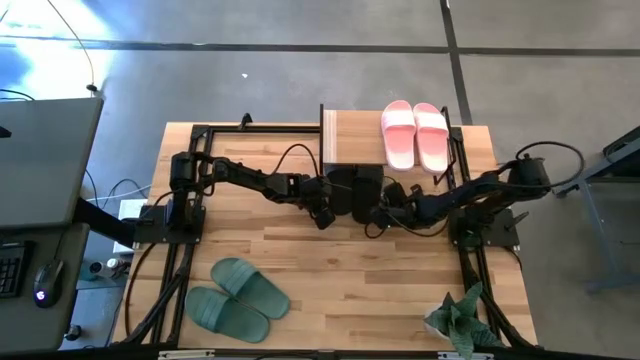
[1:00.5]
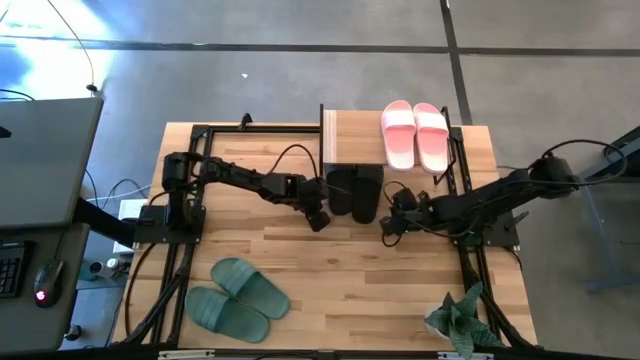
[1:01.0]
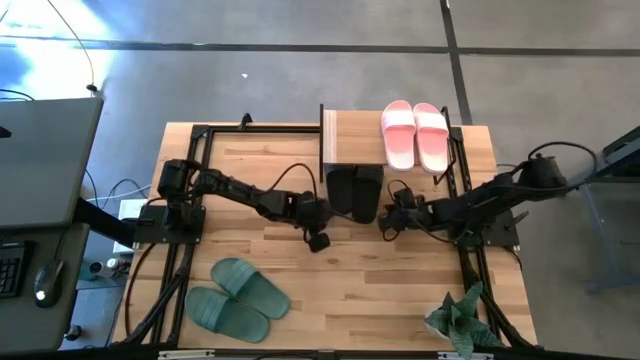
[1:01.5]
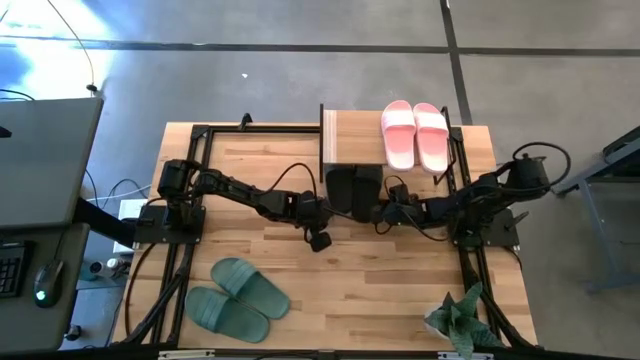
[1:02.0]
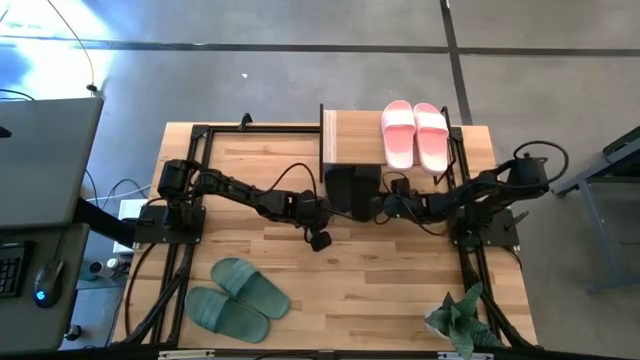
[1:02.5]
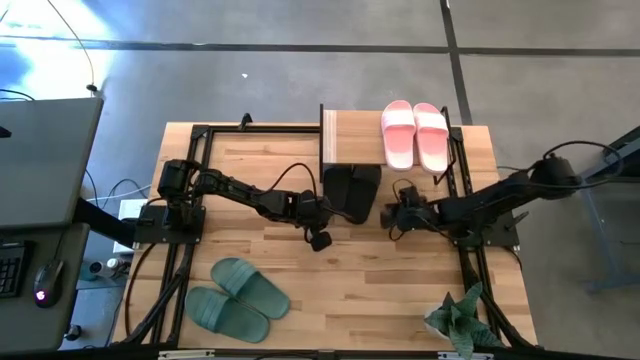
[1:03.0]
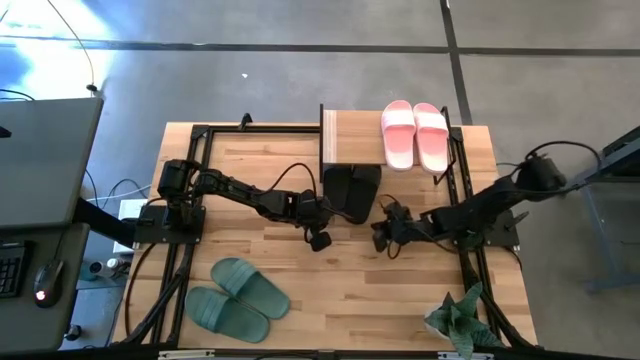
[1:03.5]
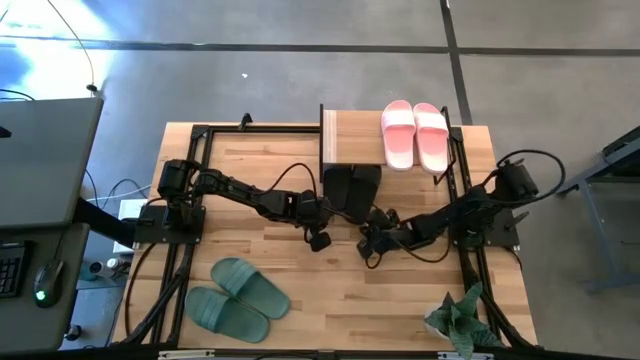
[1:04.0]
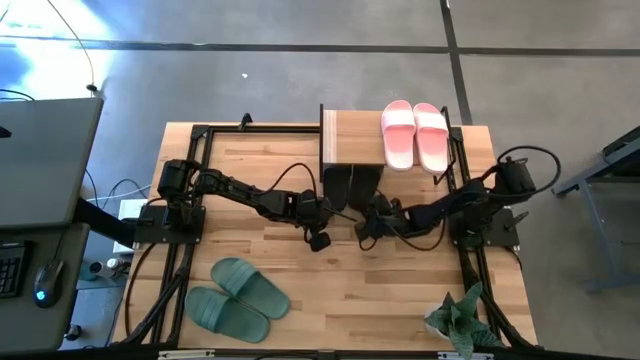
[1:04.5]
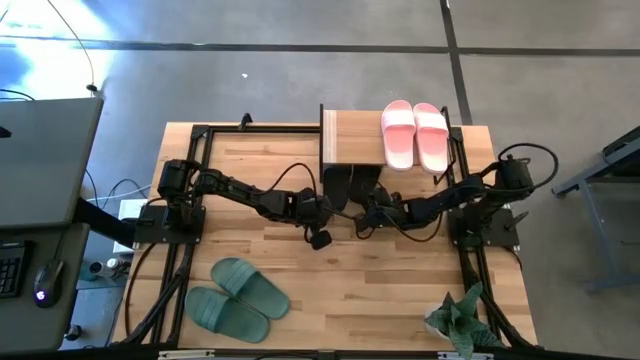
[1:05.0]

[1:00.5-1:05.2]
Task: Pick and place slides into the shelf
Adjust the right black slide

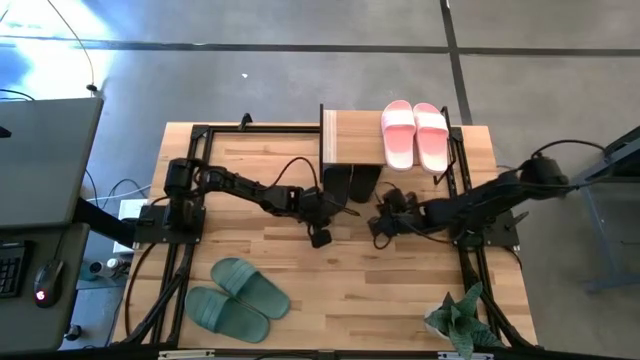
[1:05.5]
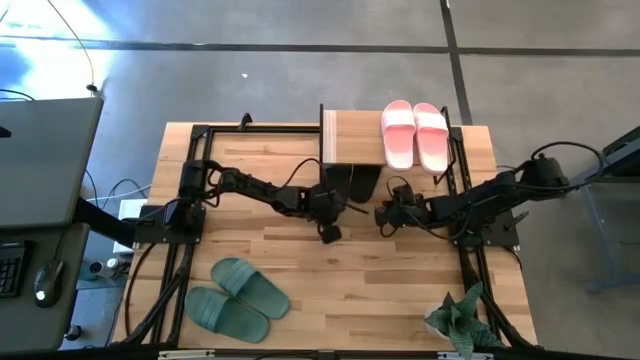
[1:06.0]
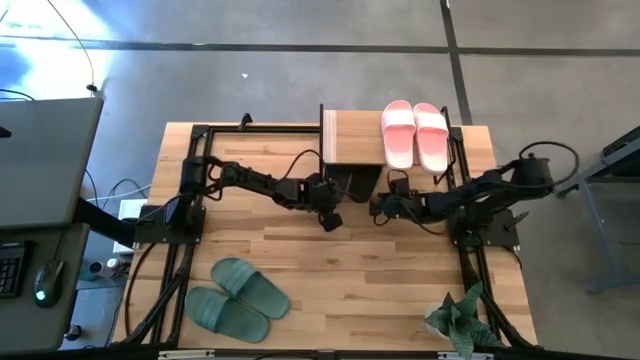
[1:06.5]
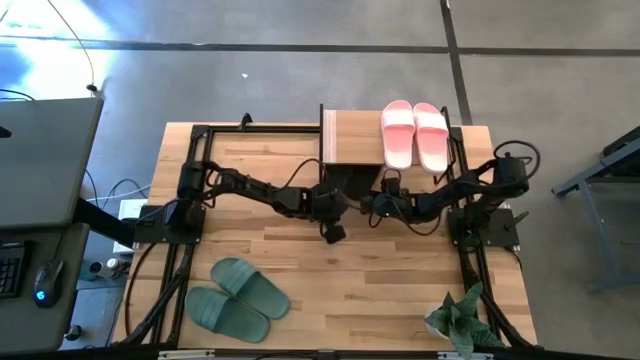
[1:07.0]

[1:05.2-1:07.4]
Adjust the left black slide

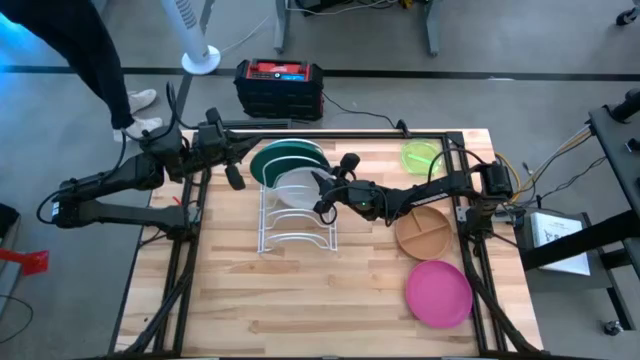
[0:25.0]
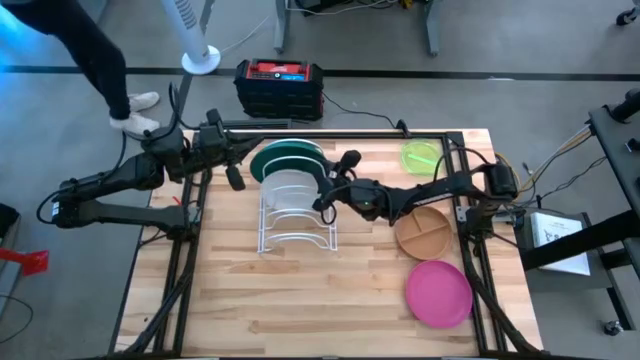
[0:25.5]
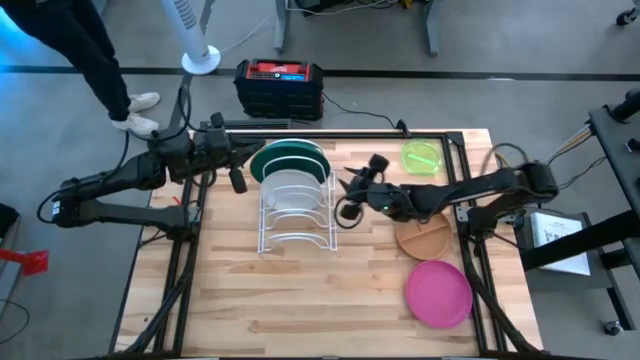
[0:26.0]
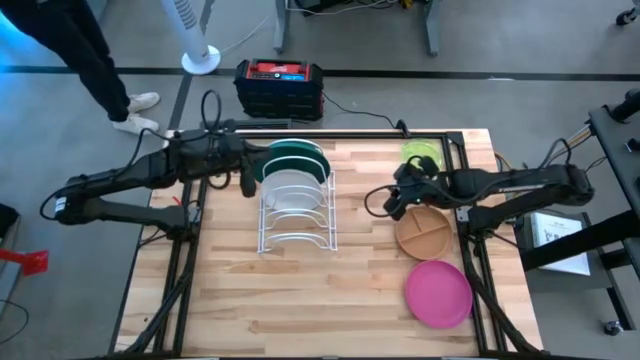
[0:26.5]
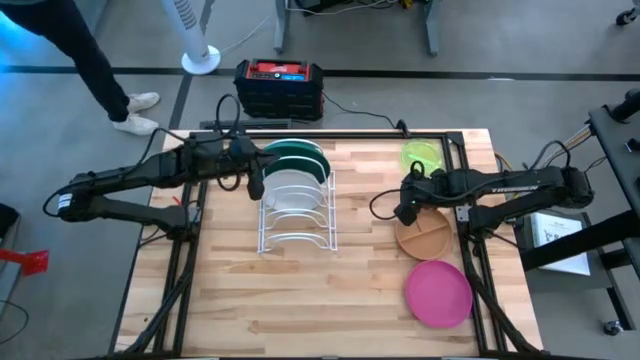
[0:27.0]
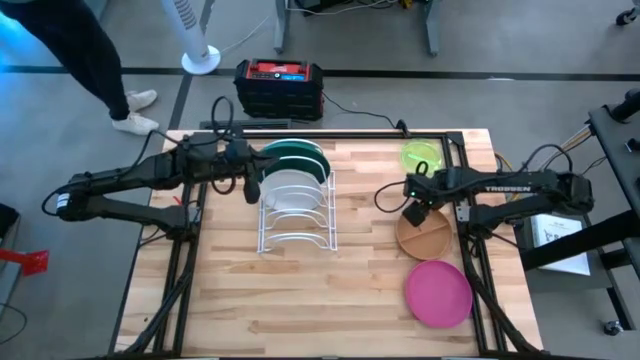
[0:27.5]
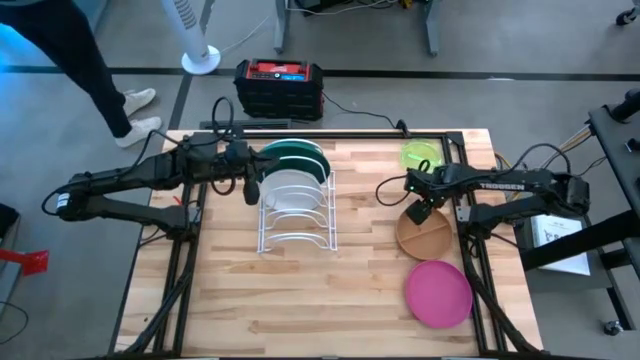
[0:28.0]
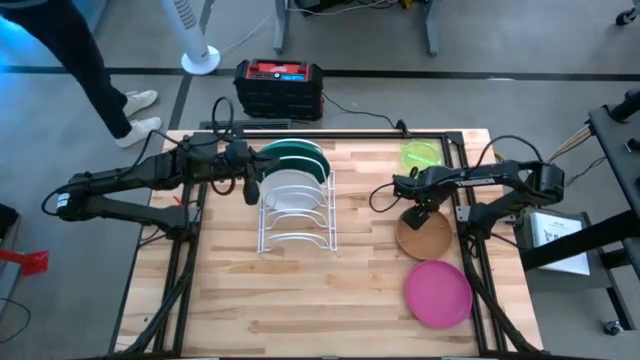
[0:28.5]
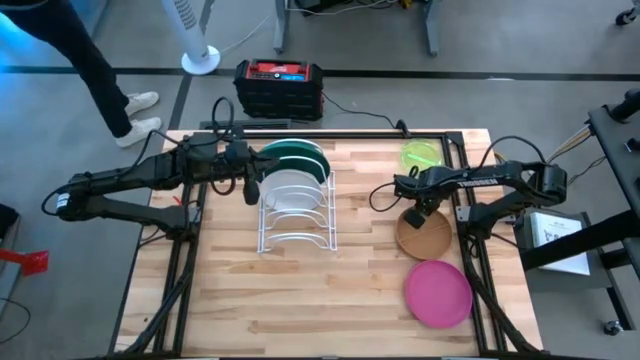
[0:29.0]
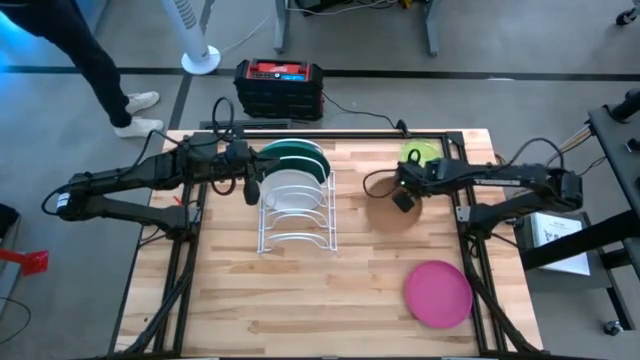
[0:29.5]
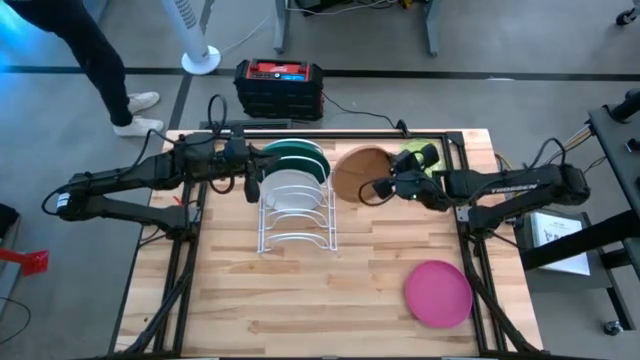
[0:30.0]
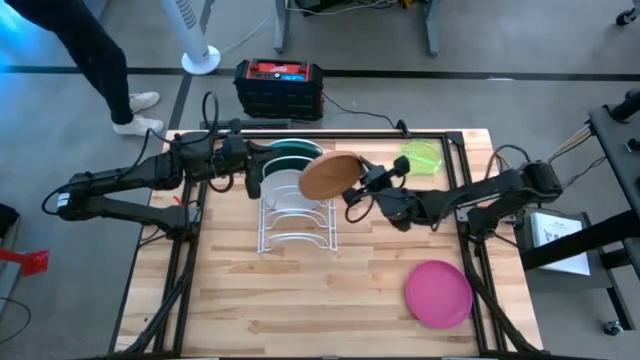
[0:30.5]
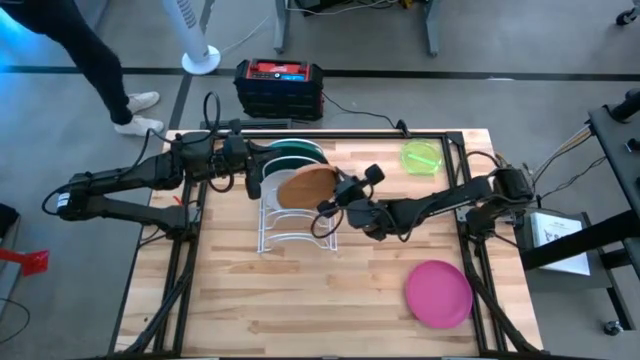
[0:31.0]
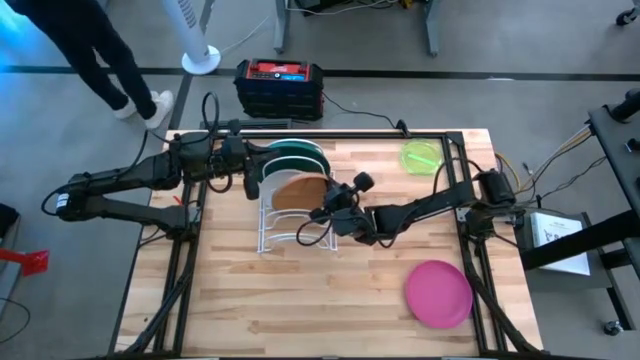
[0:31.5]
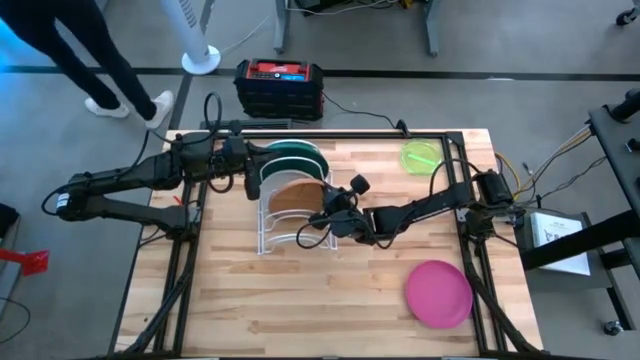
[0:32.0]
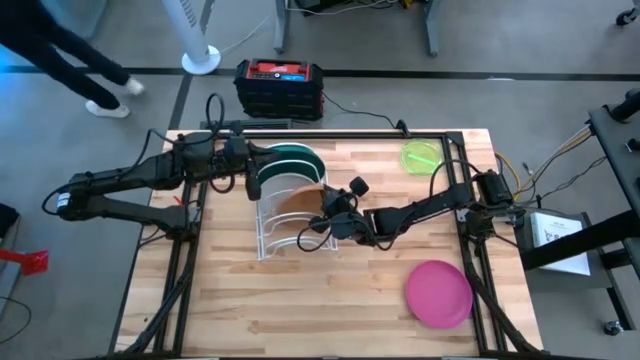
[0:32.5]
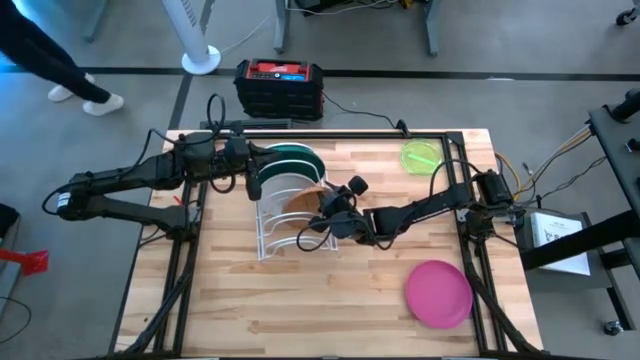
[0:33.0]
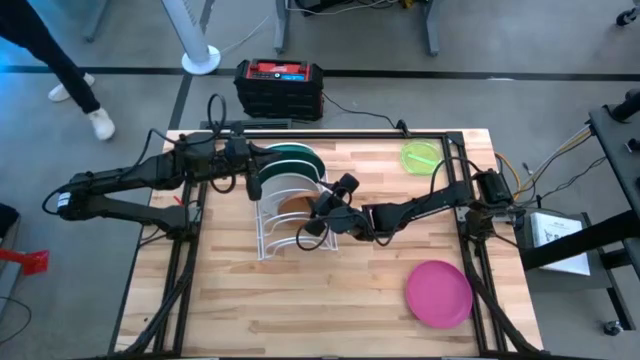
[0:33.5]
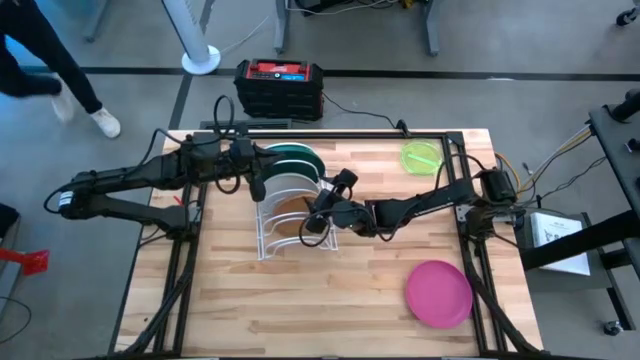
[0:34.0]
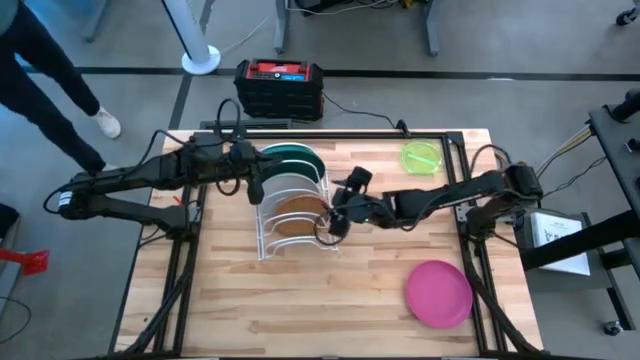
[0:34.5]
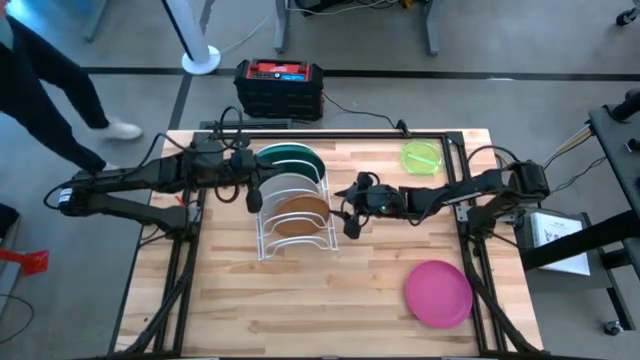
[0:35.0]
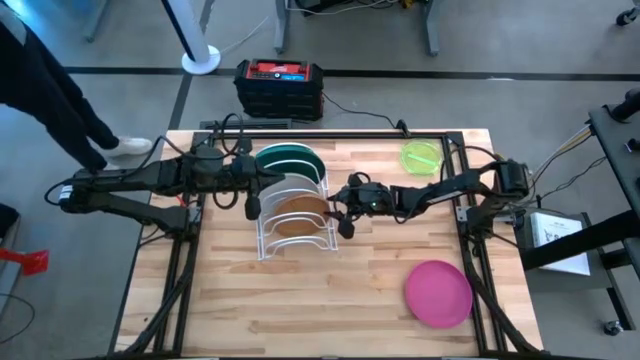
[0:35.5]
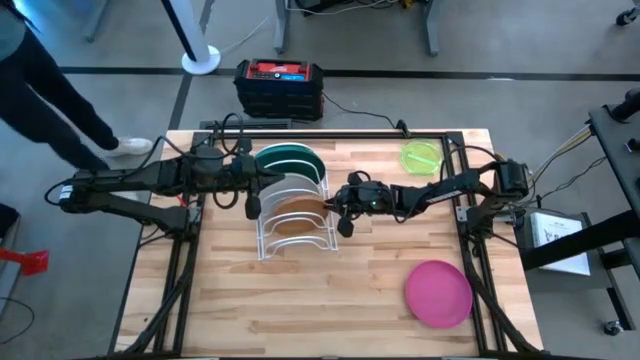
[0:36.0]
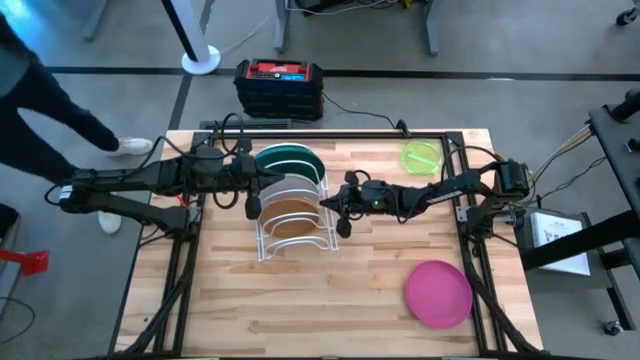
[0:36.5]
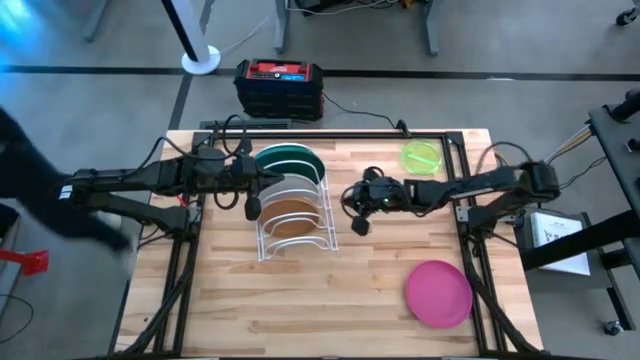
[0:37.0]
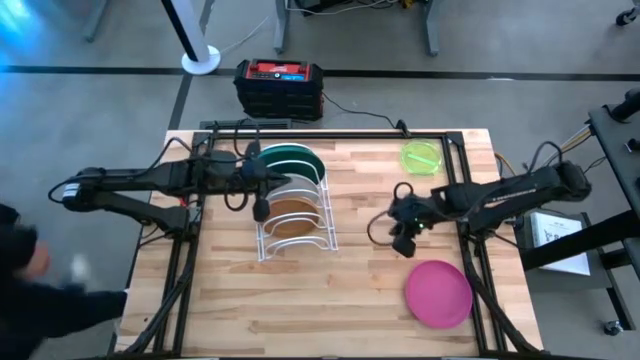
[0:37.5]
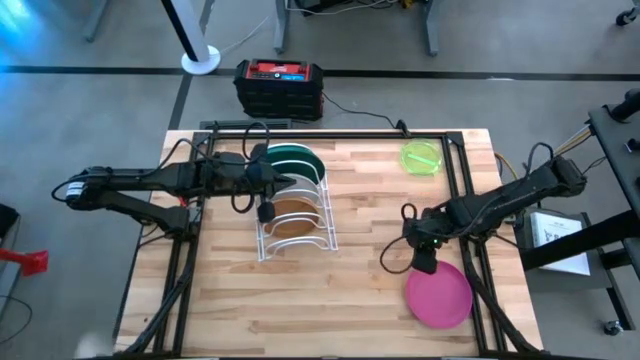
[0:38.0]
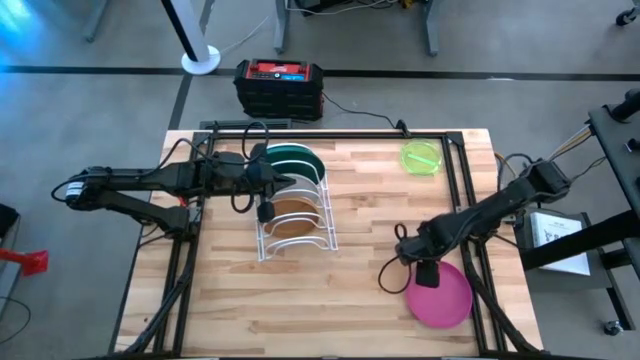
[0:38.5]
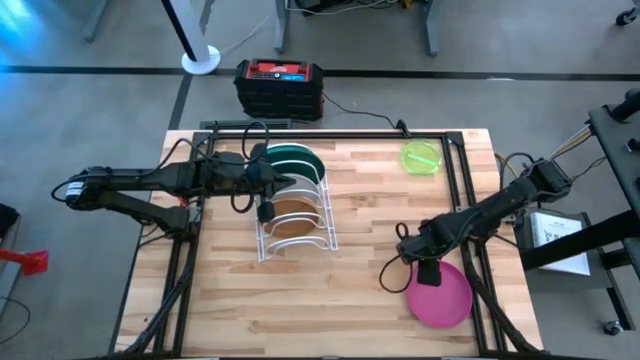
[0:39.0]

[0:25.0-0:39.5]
Task: Sort dishes
Put the brown plate in the dish rack
